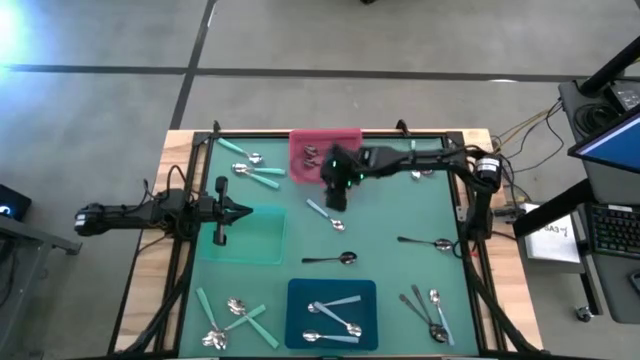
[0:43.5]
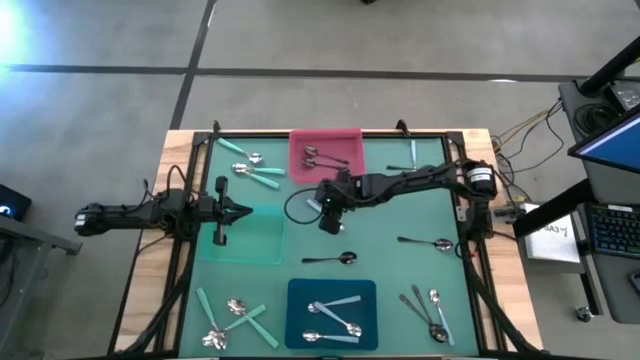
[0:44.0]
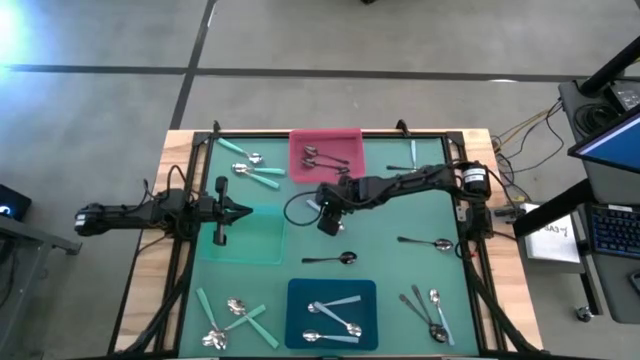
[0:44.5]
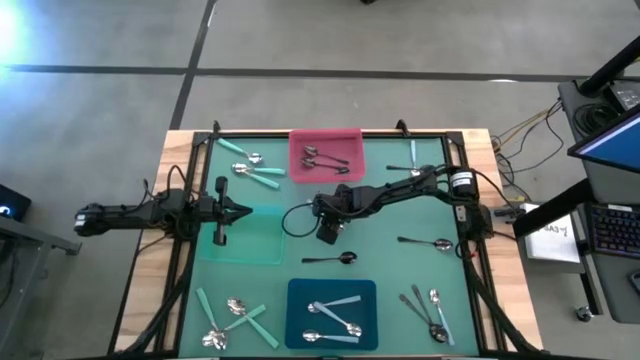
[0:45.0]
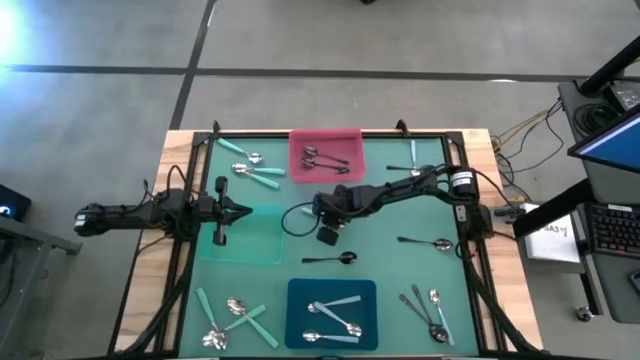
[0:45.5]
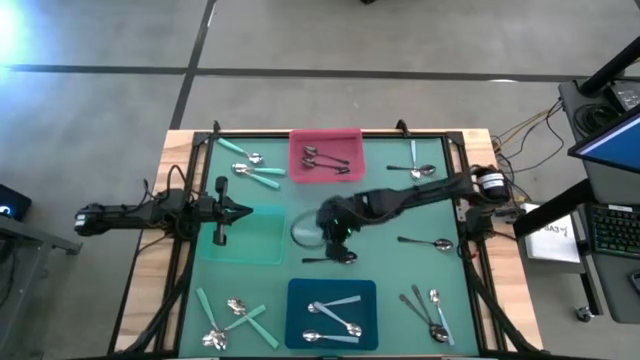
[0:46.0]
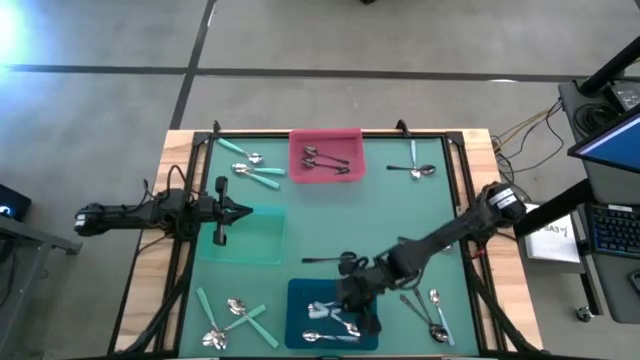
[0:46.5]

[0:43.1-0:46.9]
Task: Sort silverware by color (type)
Put the blue spoon into the blue bin

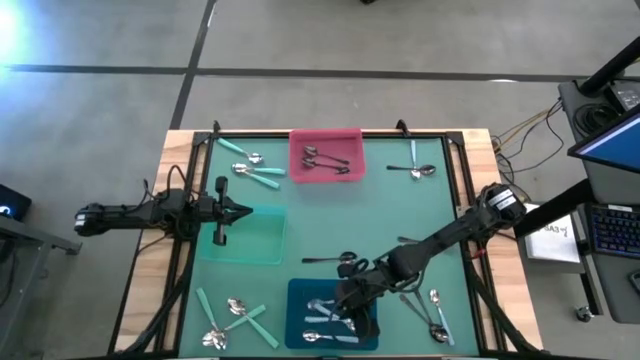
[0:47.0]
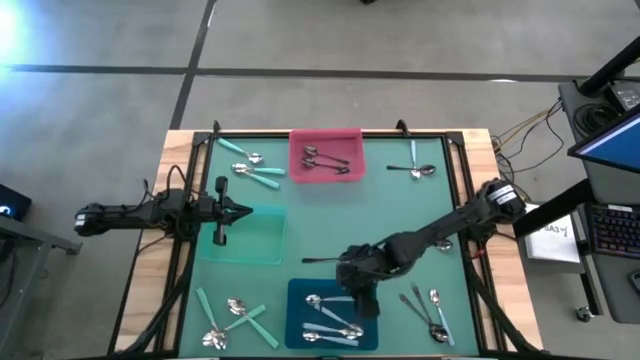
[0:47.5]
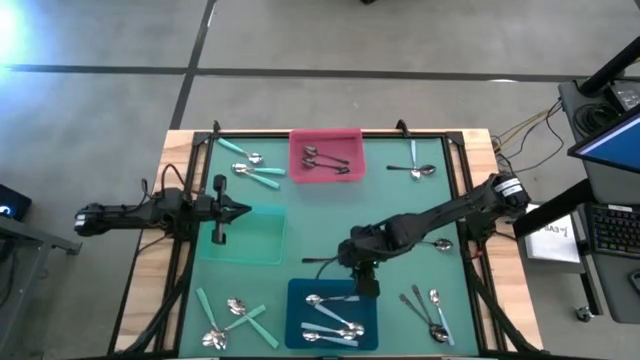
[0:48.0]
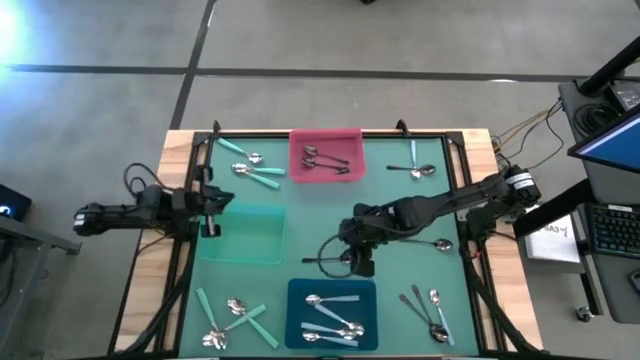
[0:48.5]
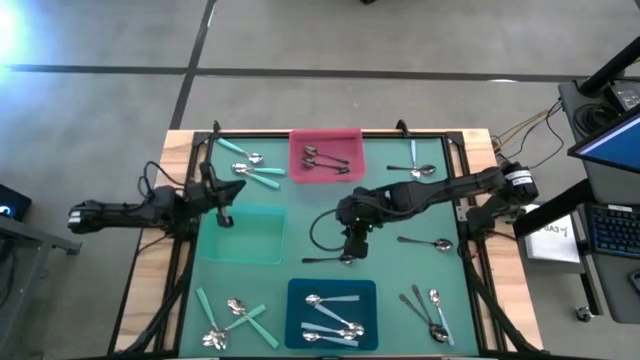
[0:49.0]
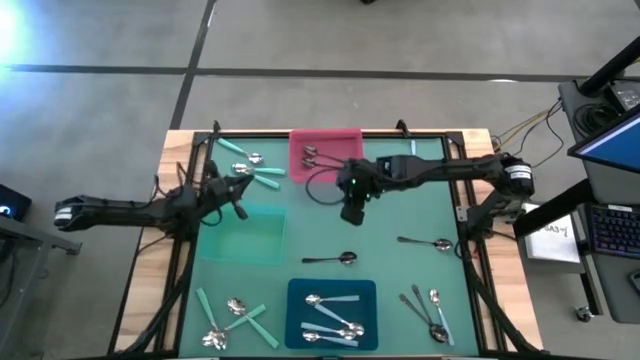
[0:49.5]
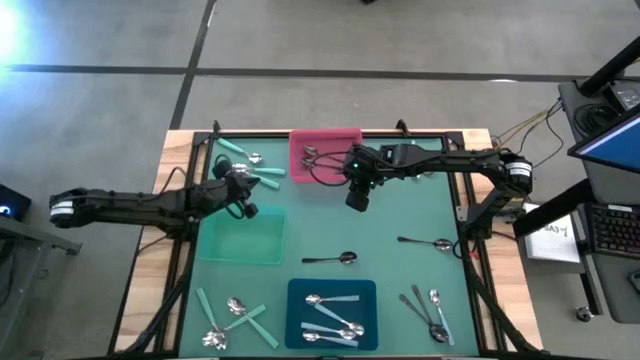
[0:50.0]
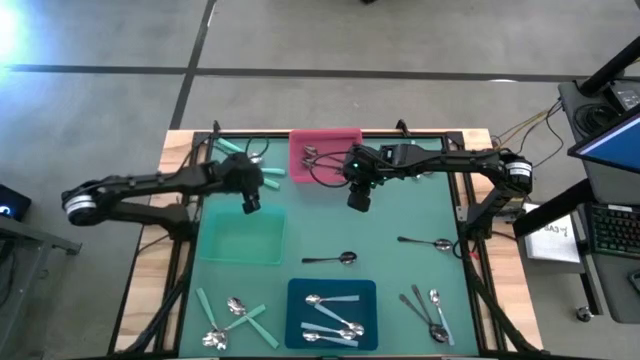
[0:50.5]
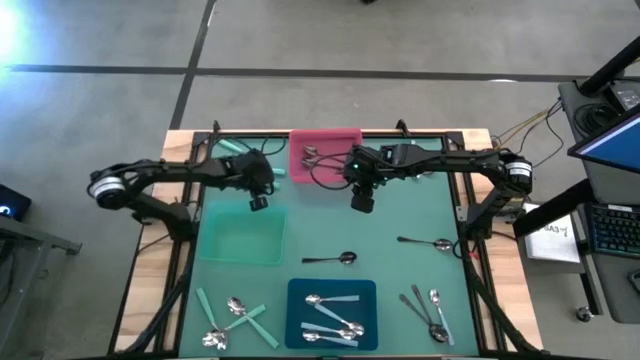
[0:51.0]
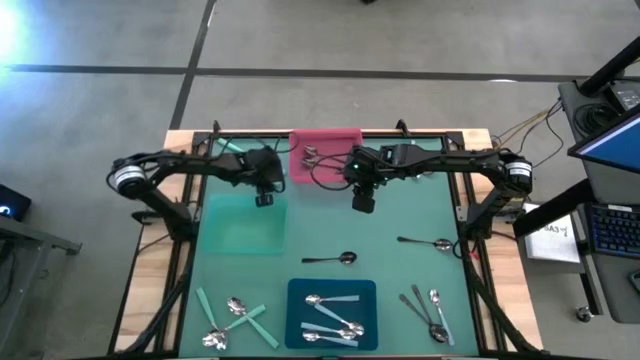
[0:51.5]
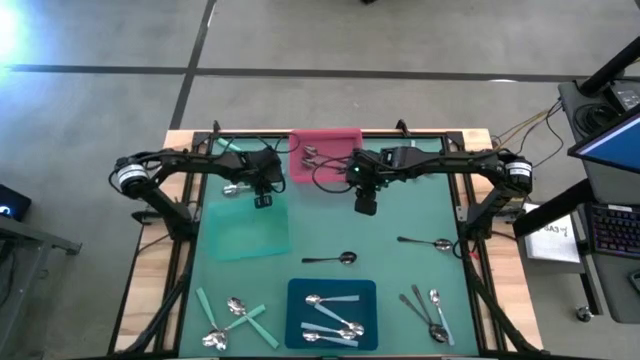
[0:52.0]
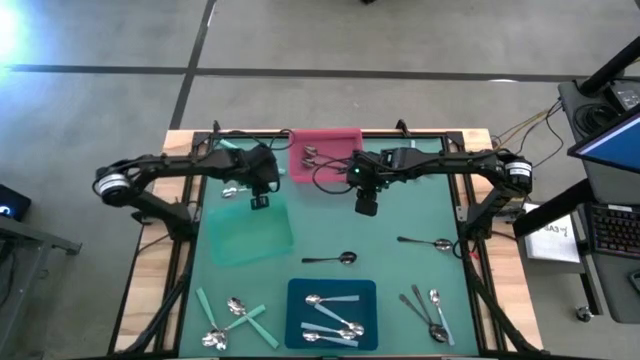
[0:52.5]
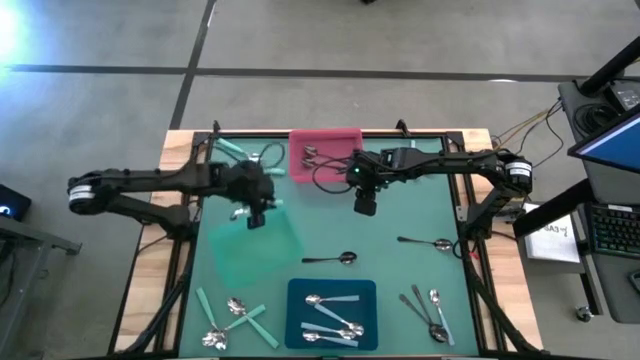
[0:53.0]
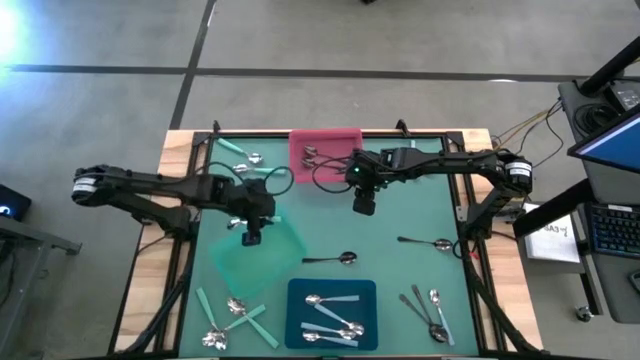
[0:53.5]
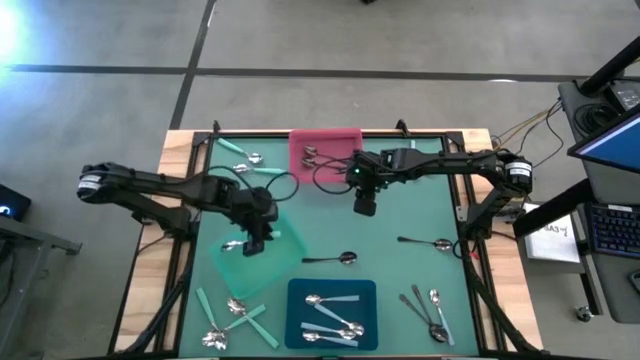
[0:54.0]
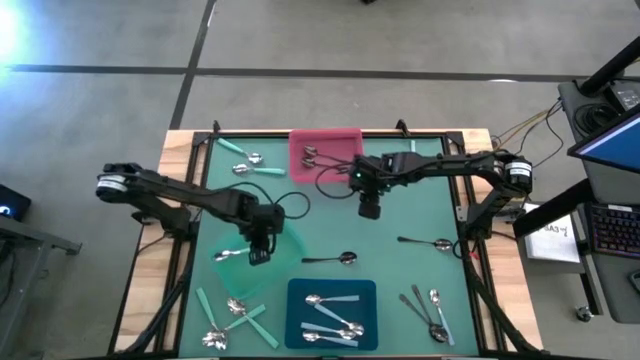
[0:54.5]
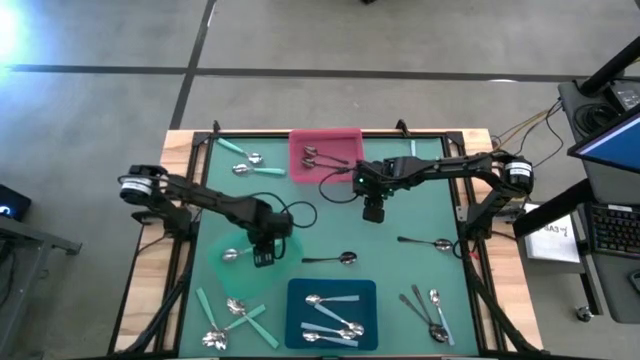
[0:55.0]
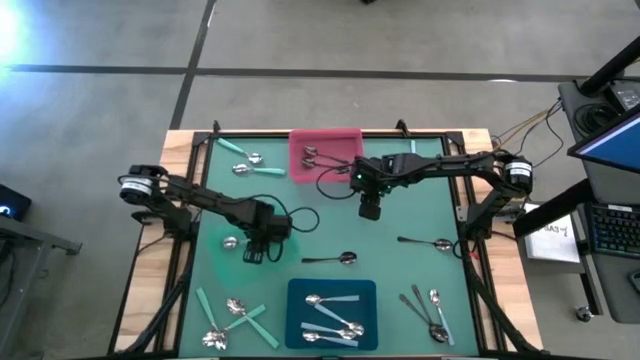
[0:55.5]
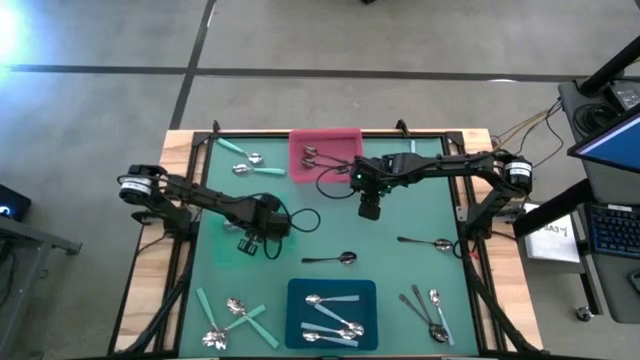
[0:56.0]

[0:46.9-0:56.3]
Put the green spoon into the green bin

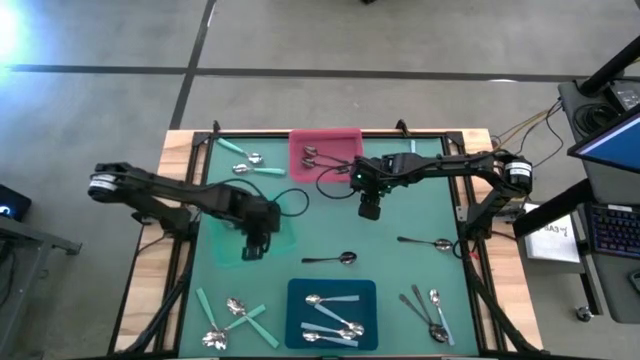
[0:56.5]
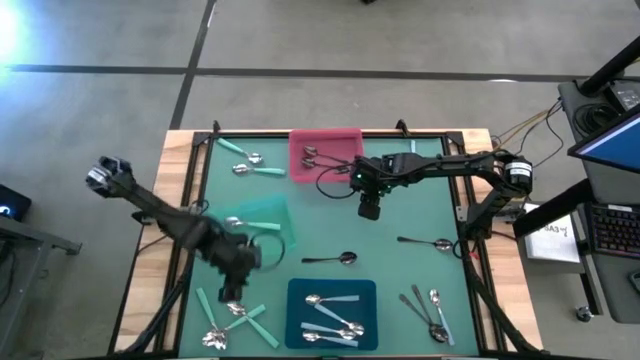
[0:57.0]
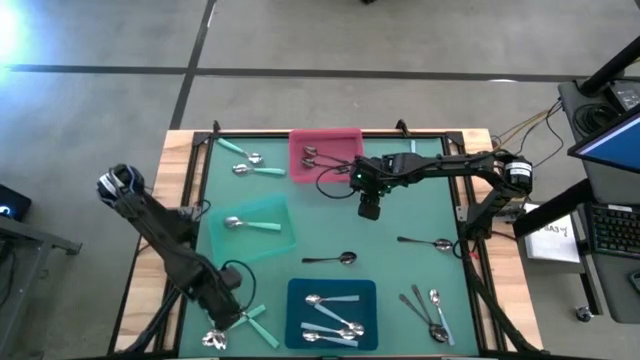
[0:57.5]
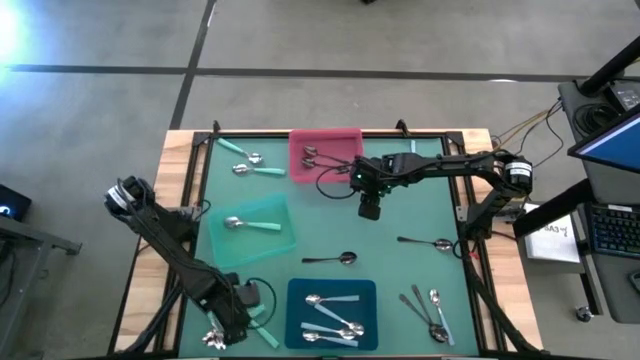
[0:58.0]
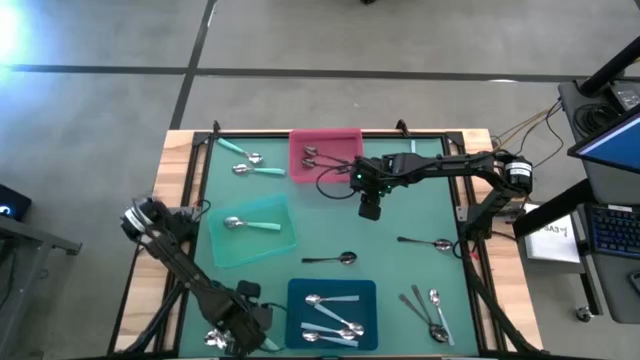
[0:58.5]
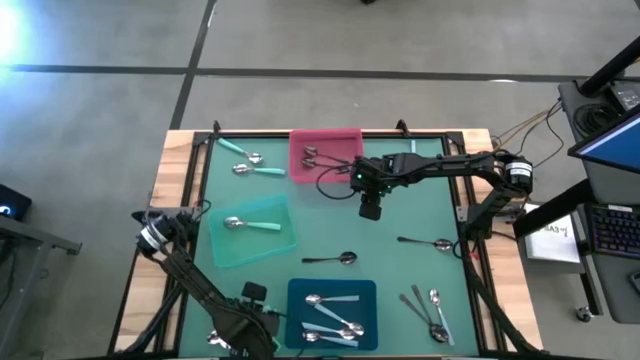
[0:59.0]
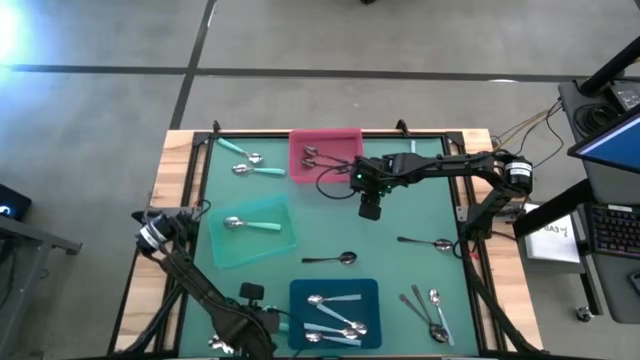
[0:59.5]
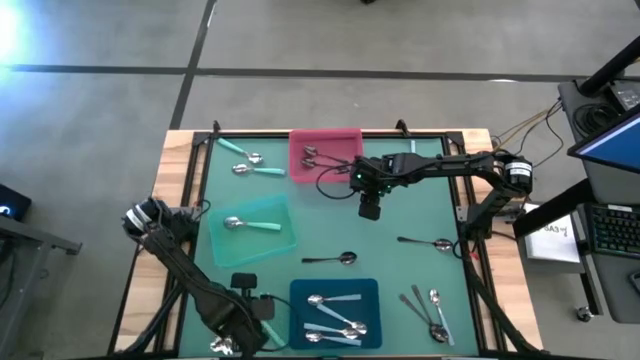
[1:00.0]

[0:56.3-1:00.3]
Put the green spoon into the green bin

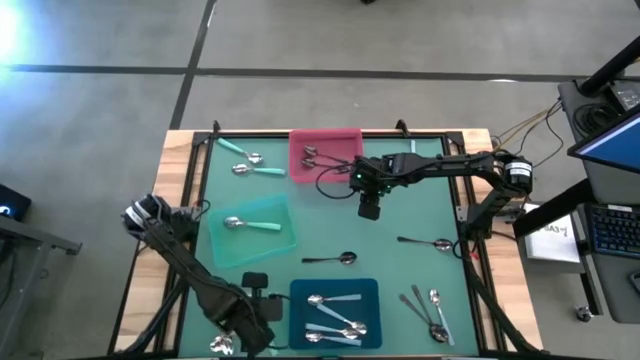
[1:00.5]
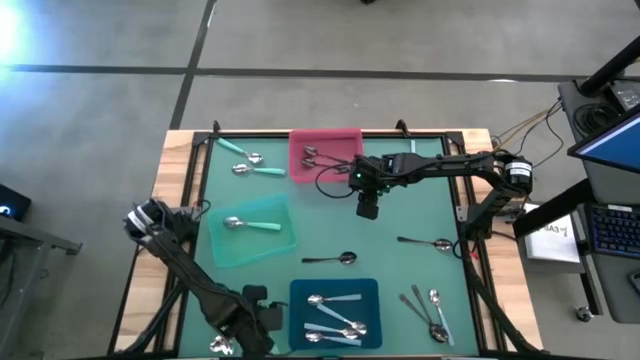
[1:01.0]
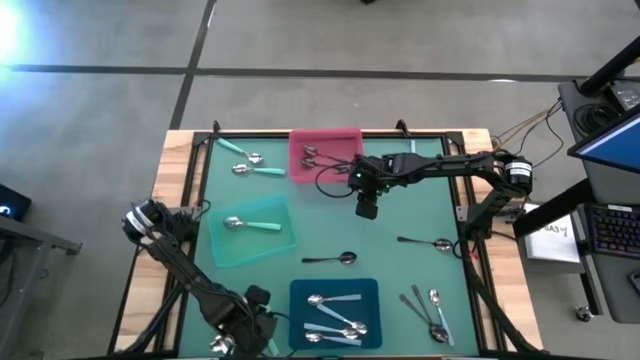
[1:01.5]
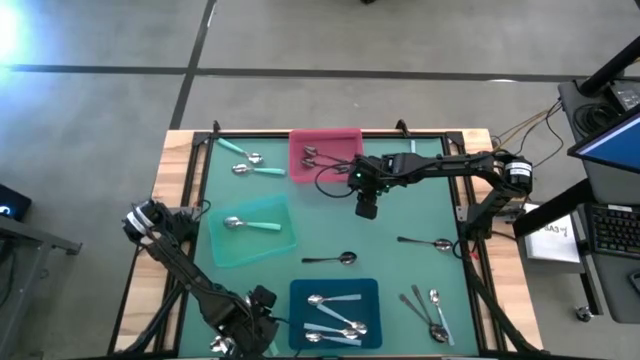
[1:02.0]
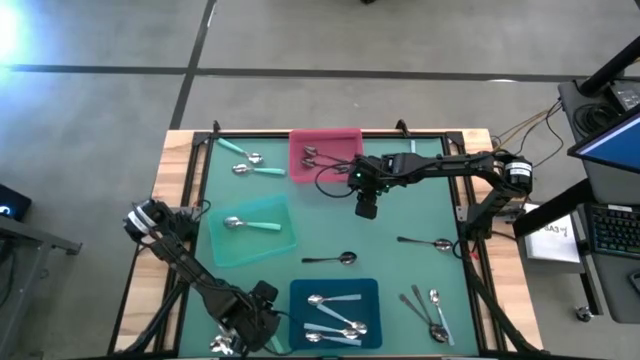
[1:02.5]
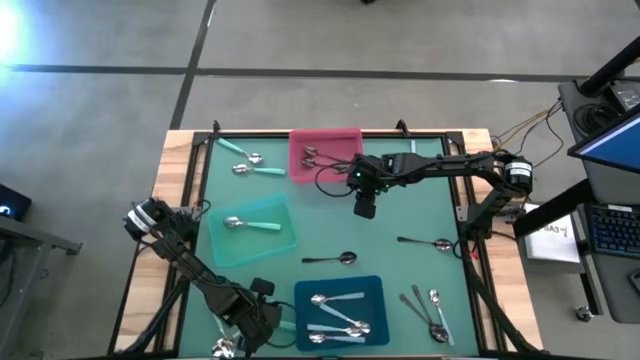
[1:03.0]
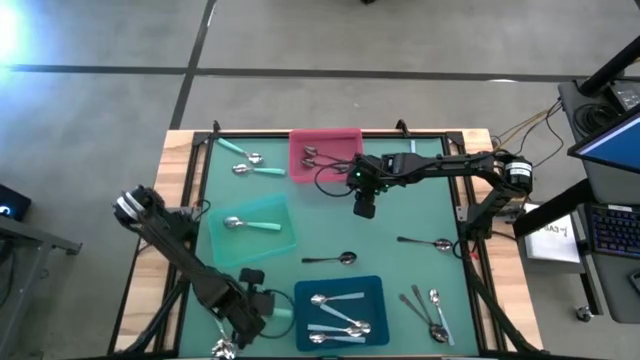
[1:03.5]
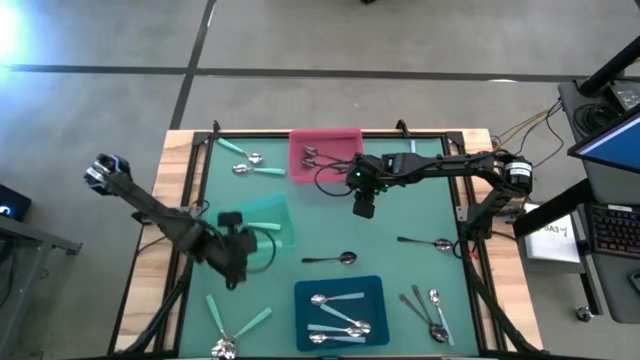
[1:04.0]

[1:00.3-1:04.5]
Put the green spoon into the green bin

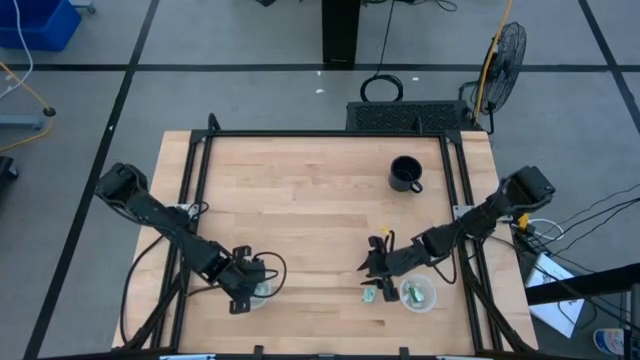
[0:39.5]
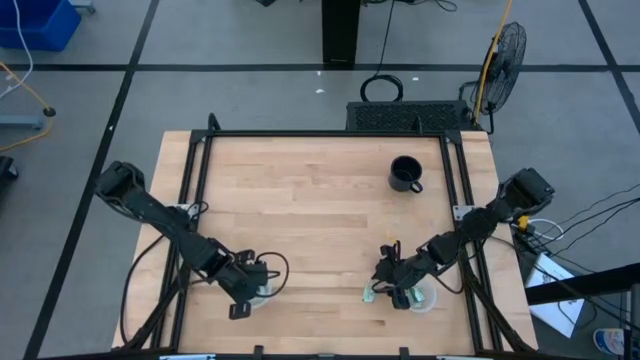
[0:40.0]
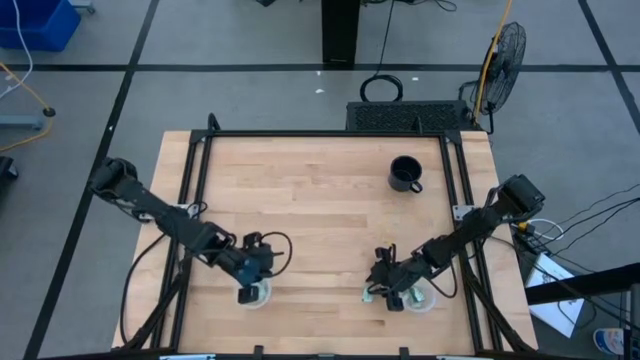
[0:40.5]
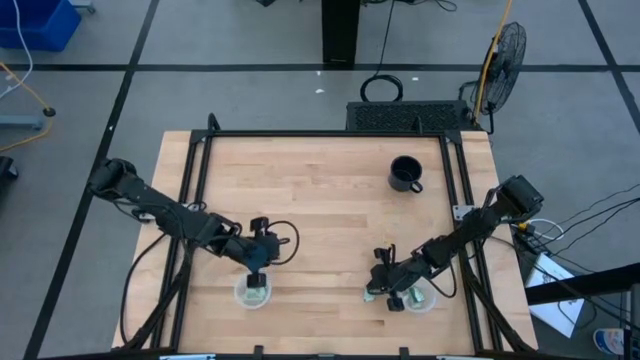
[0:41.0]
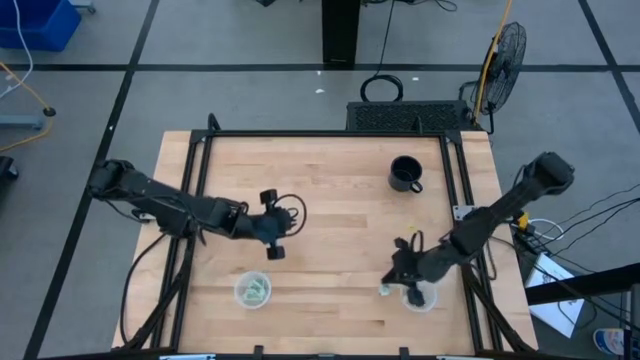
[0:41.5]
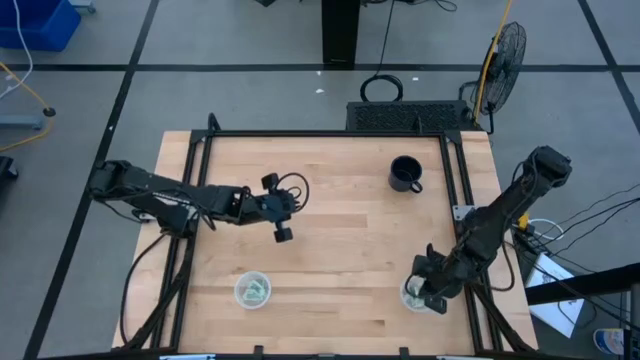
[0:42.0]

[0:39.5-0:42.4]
Task: Pick and place Stevia / Truvia into bins
Put the stevia packet into the left transparent container
